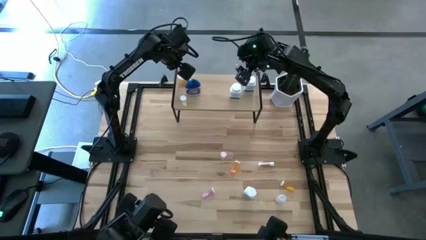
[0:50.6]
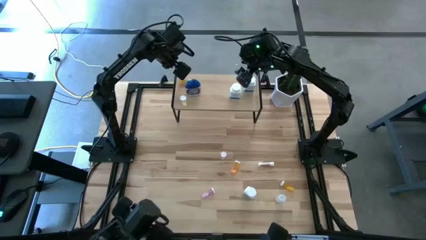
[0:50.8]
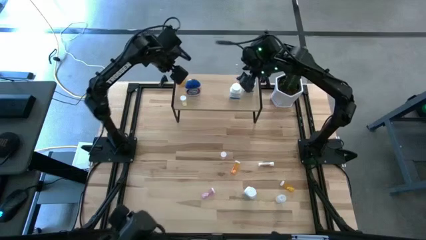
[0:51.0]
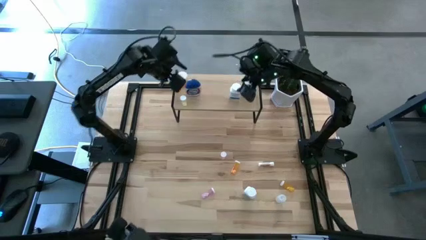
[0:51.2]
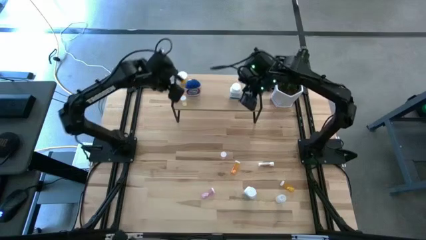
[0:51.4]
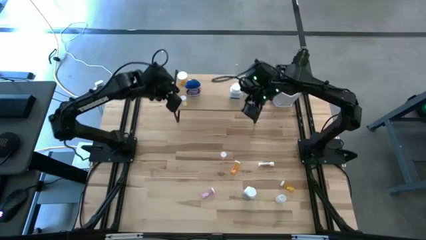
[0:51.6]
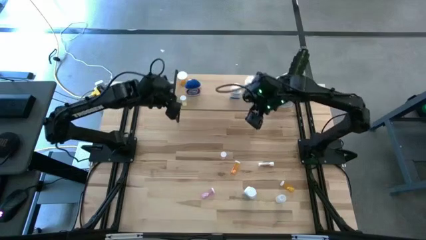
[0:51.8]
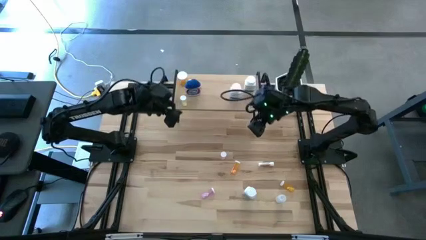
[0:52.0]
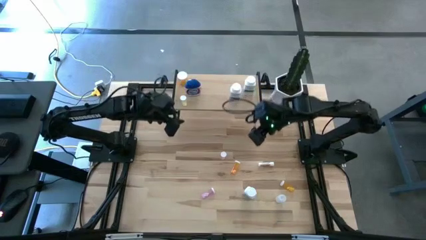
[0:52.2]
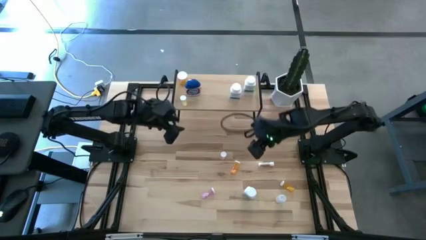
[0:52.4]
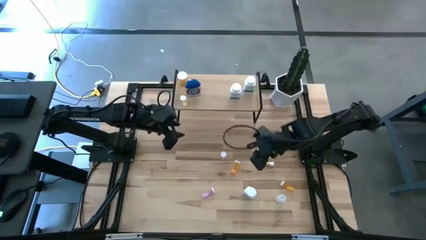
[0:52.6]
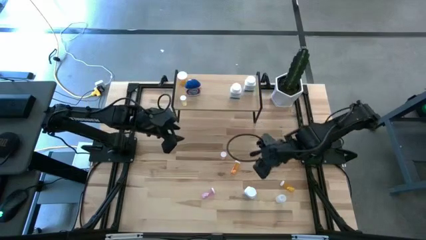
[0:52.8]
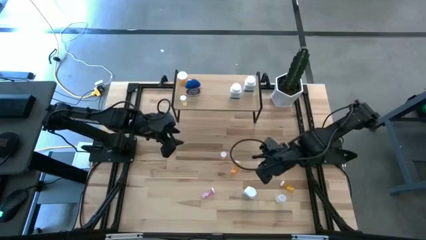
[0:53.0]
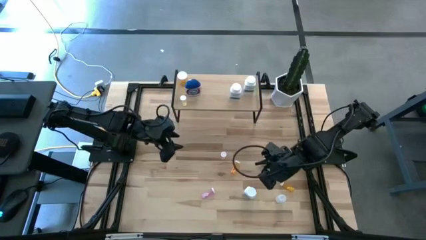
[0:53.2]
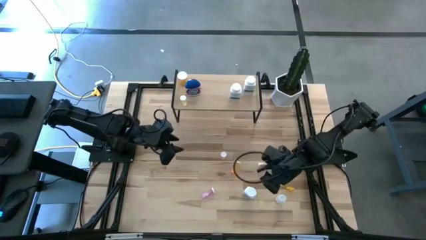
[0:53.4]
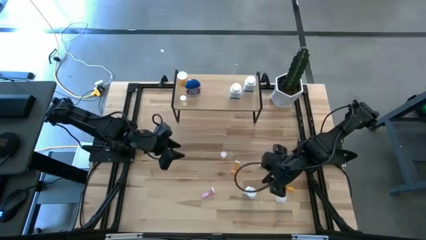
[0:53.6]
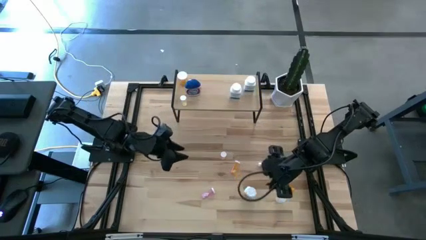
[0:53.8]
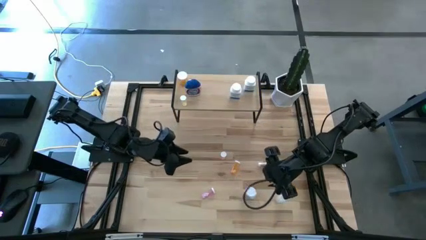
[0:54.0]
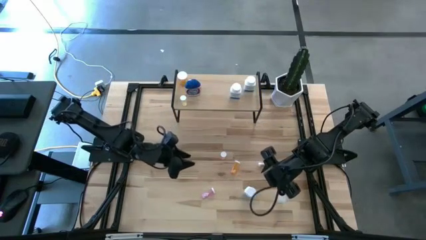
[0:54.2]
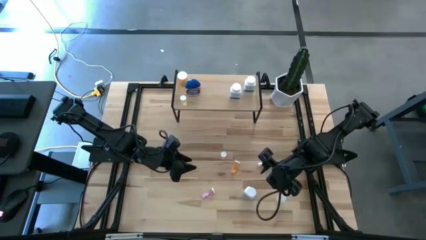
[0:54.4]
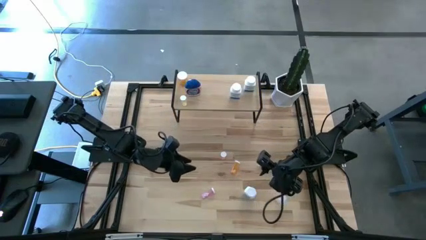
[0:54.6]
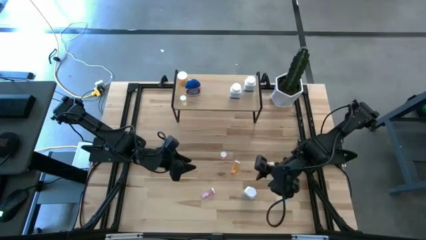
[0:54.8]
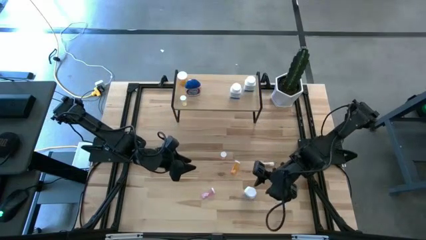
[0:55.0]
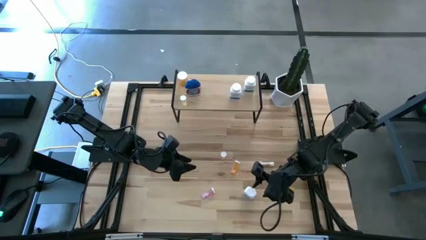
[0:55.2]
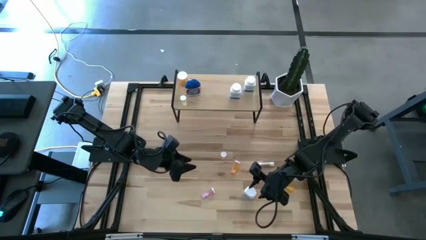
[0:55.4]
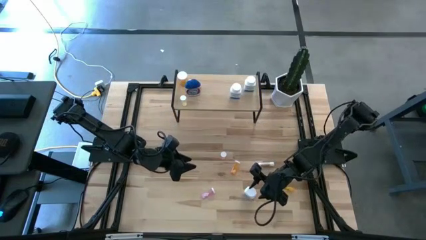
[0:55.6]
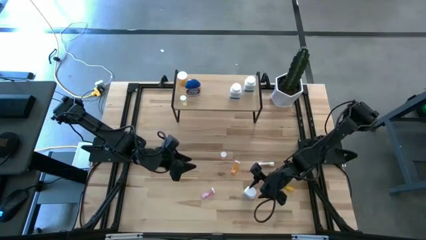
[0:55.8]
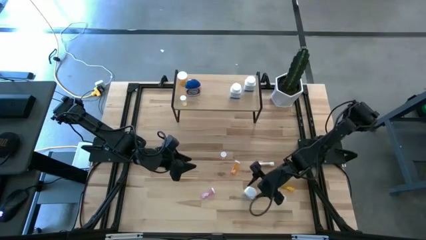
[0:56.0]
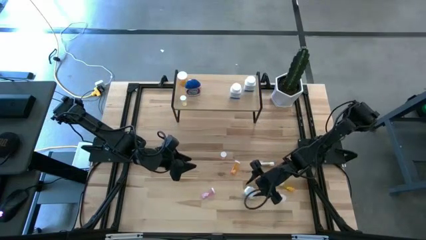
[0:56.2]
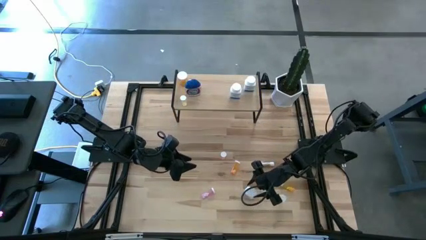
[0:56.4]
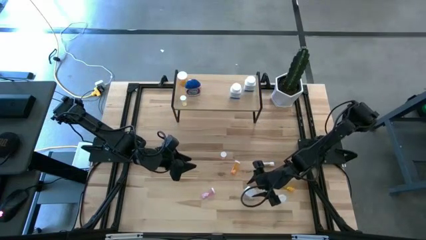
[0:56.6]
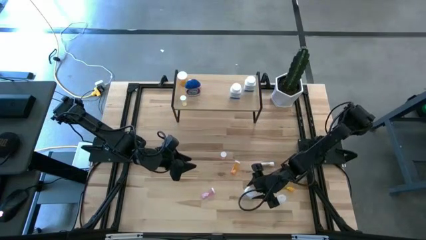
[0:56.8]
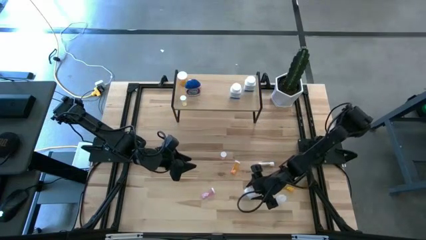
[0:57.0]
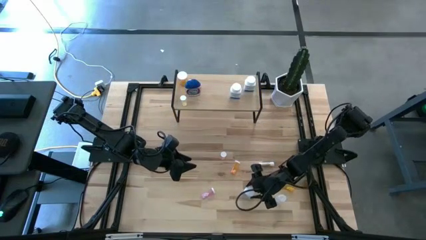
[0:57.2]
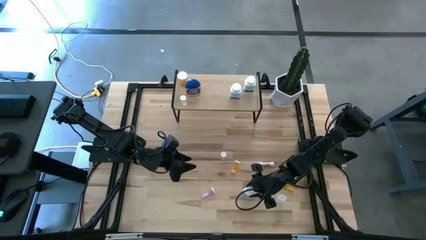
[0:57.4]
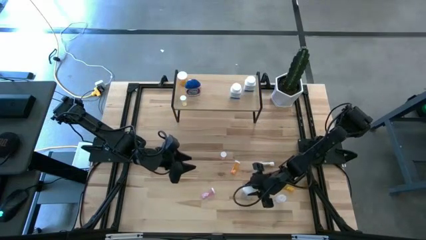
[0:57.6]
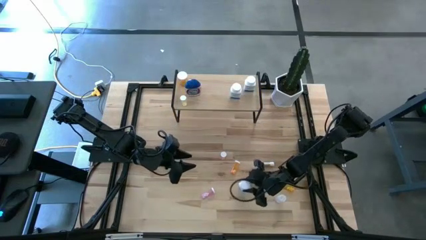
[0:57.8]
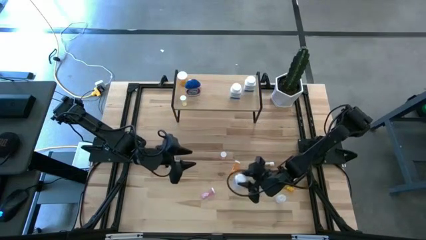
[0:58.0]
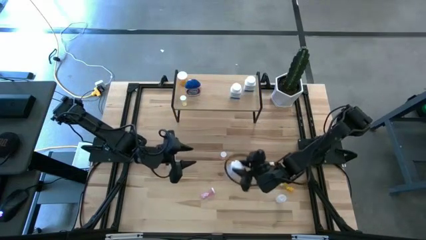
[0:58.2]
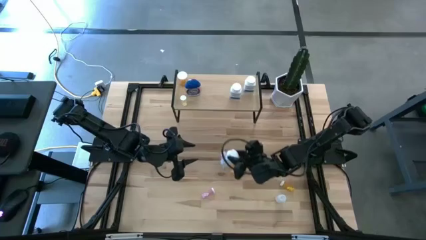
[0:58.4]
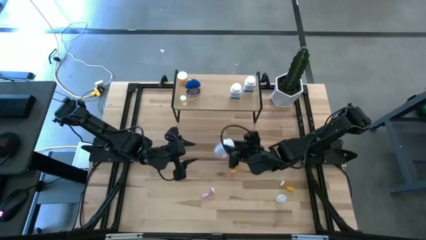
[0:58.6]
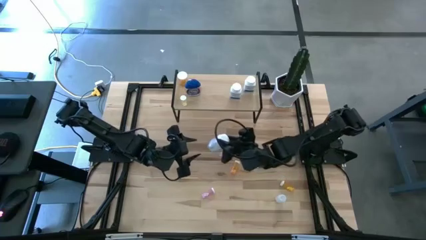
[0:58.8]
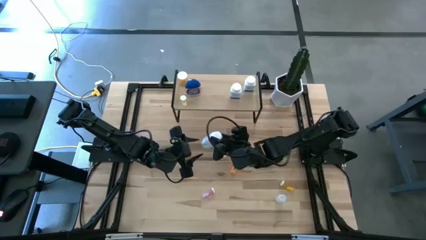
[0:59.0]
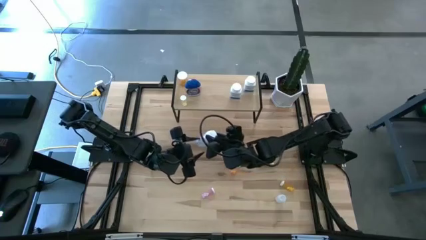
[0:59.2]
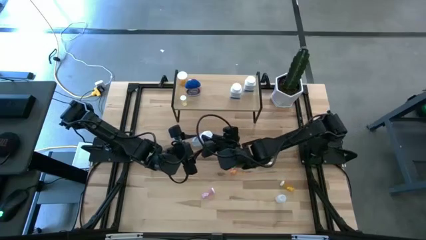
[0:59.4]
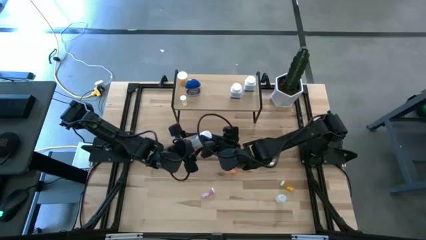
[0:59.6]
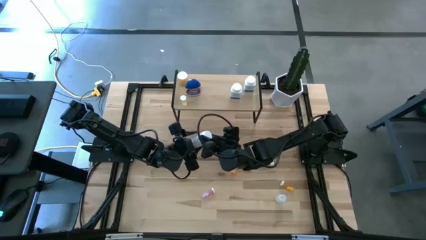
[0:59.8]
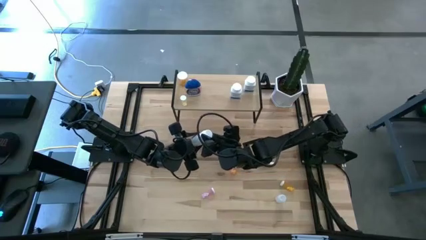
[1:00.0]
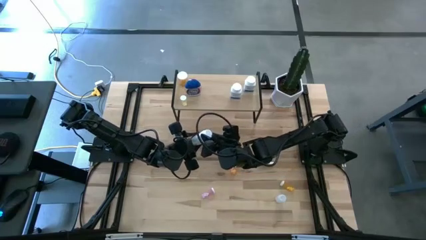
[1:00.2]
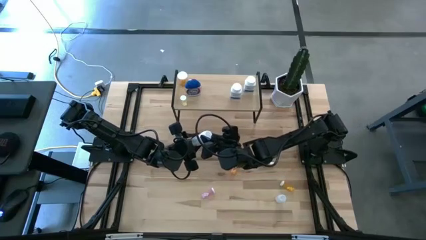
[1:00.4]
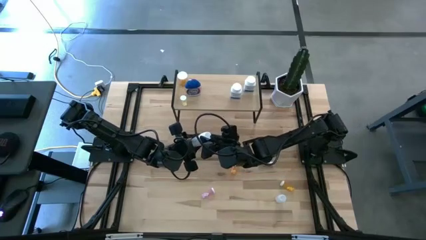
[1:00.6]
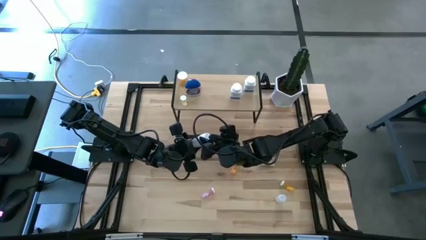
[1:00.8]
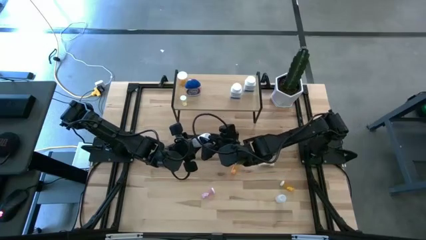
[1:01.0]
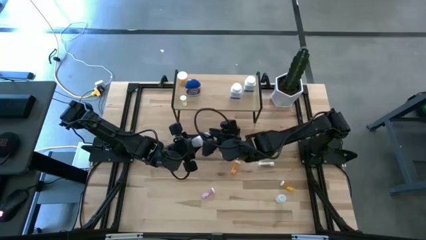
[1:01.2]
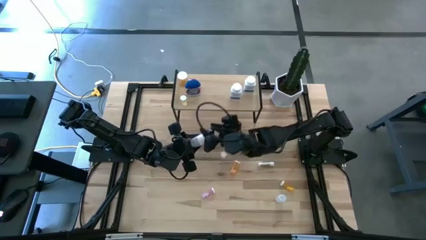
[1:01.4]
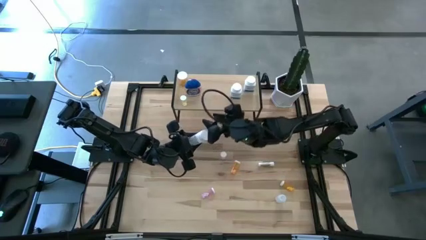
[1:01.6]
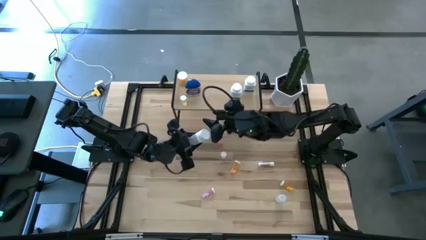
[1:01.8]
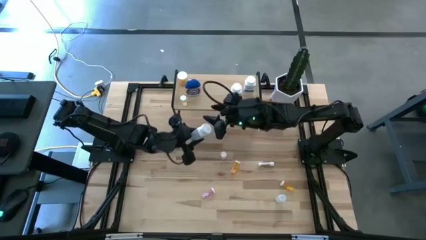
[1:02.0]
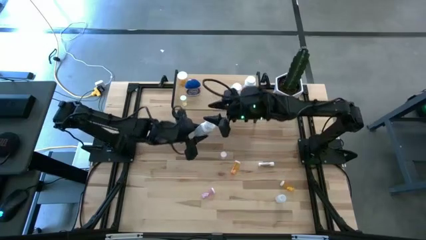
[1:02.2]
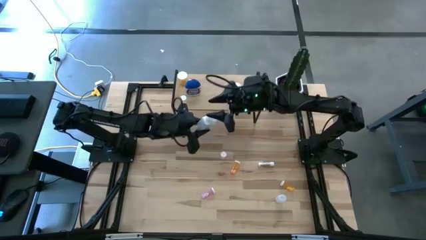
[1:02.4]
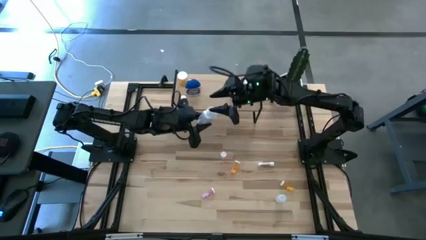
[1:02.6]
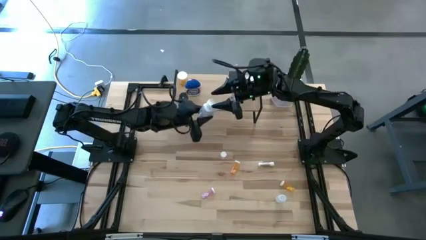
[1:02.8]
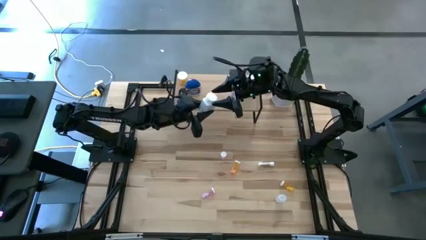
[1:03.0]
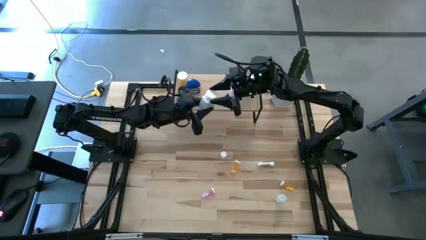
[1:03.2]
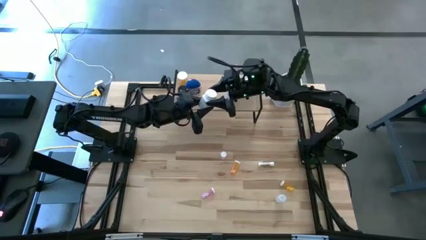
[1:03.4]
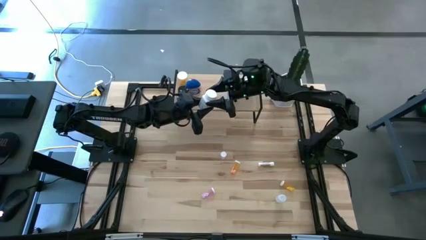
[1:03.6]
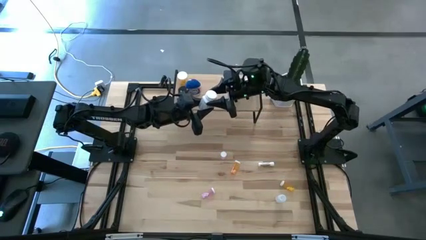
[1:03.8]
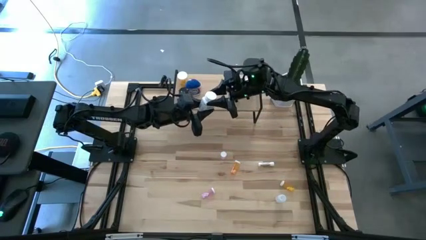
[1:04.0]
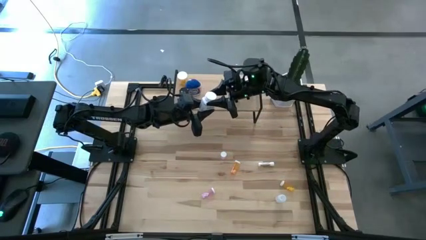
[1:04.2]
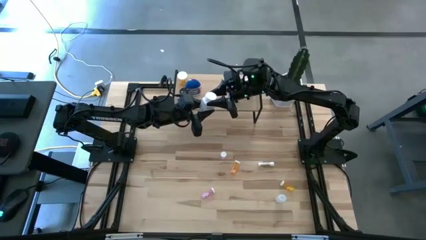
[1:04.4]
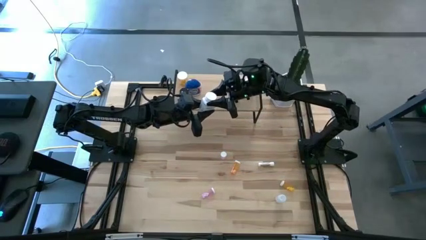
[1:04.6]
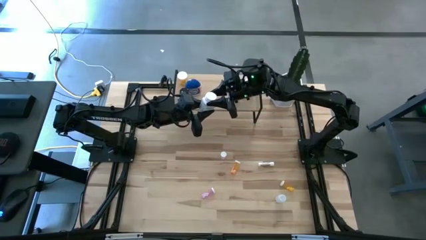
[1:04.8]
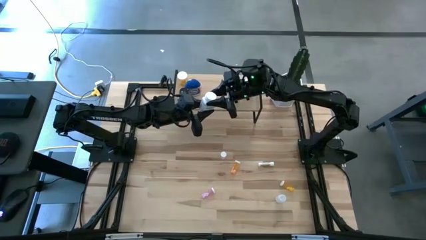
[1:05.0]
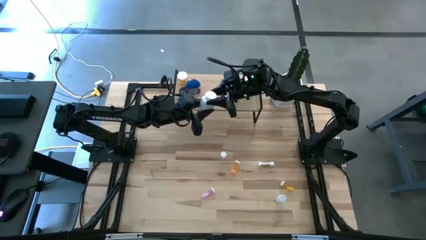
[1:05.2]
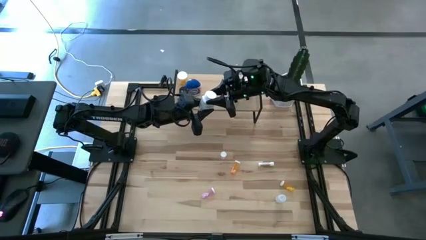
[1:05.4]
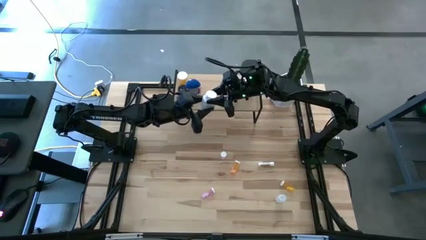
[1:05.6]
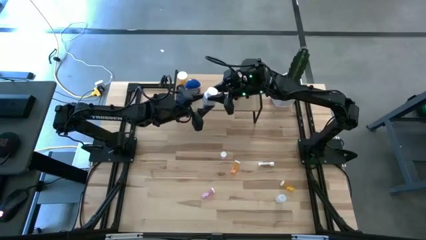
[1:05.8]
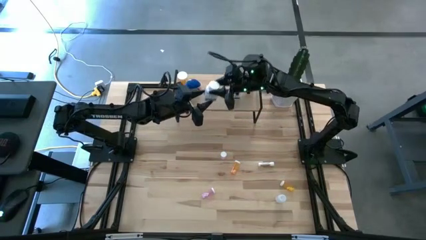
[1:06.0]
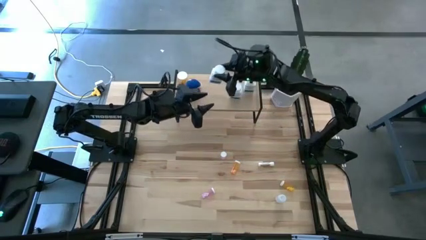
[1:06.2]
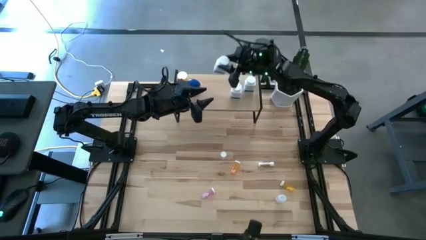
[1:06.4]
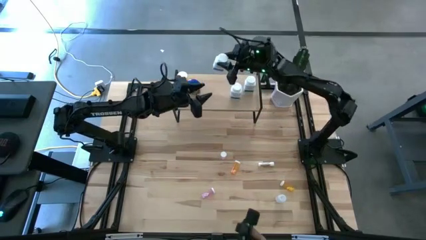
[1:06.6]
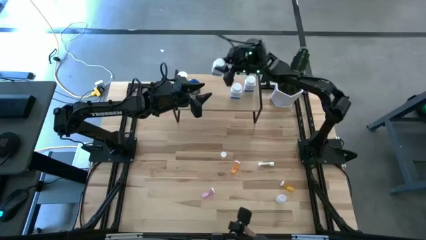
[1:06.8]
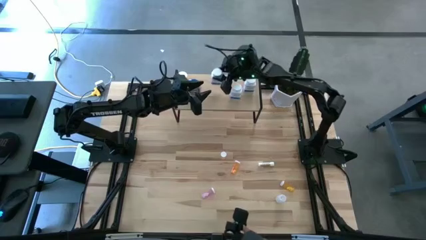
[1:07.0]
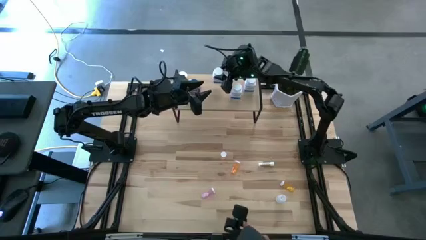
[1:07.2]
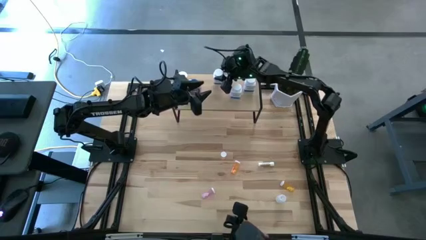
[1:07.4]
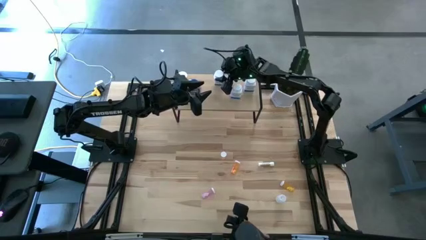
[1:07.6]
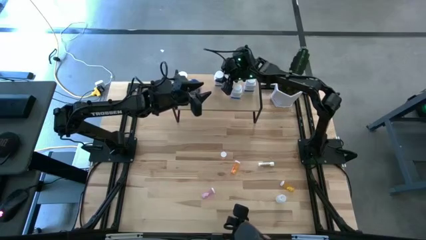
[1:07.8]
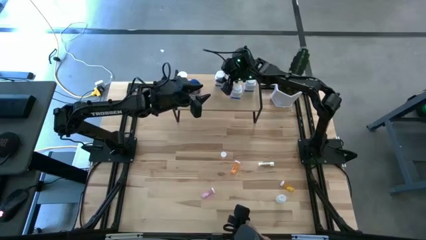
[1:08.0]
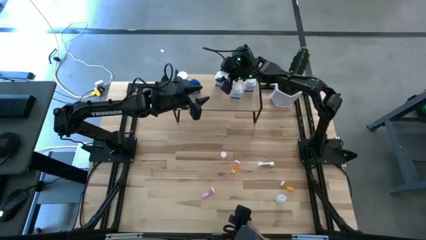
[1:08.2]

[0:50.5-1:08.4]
Task: Pick and place medicine bottles onto shelf by color
Put the large white pill bottle on the shelf
